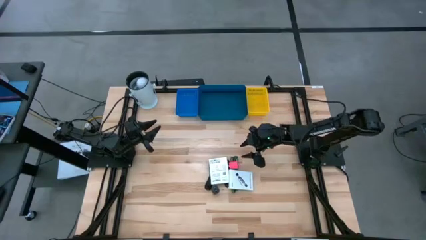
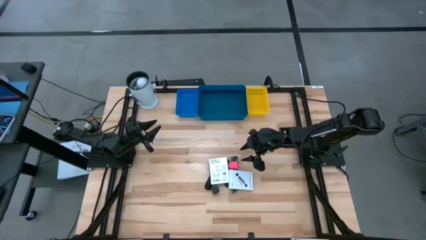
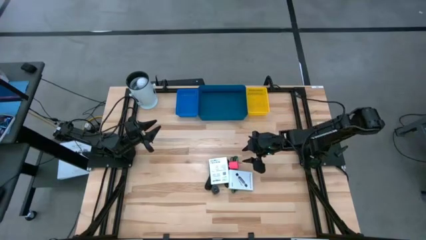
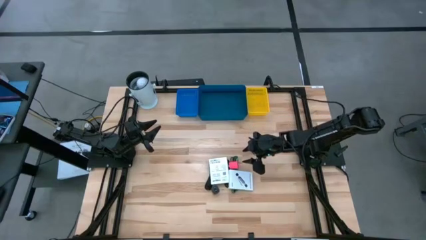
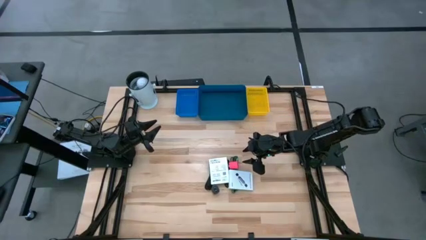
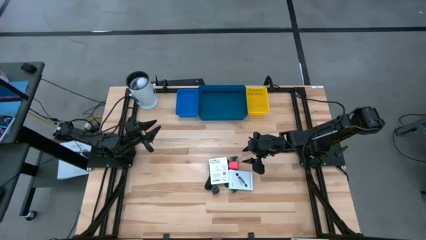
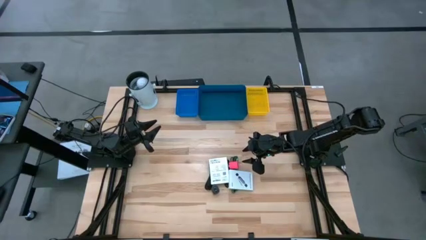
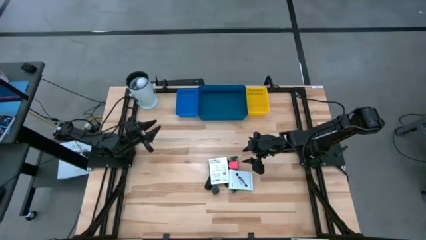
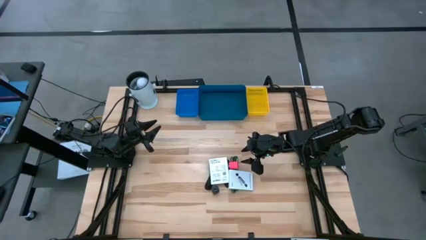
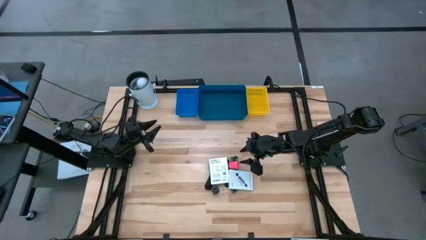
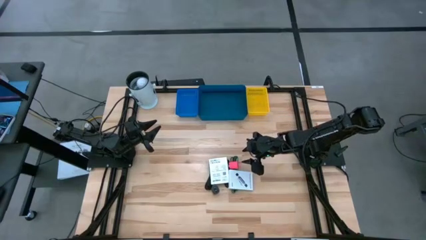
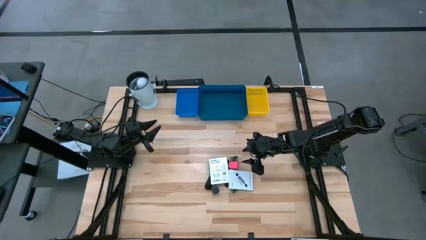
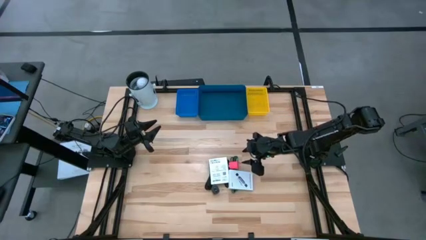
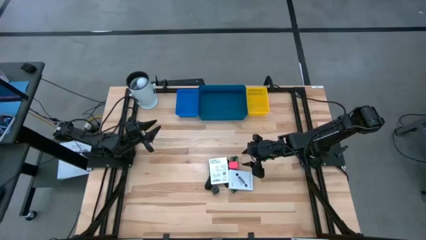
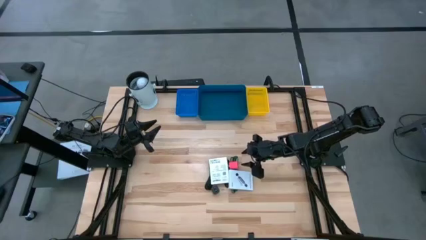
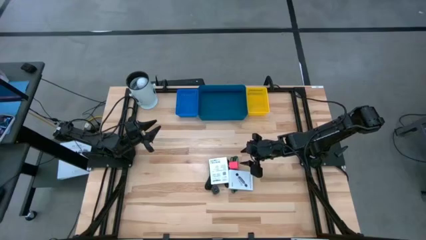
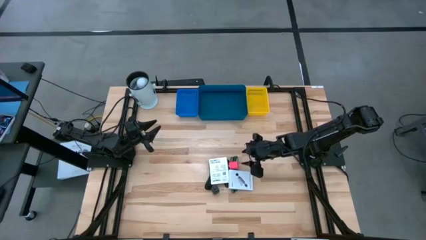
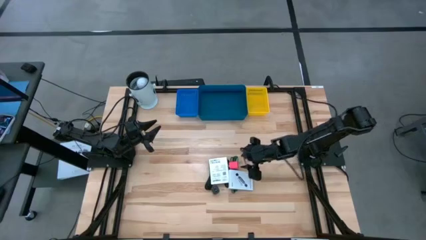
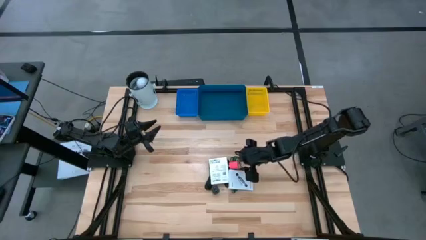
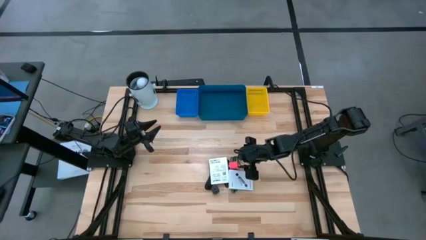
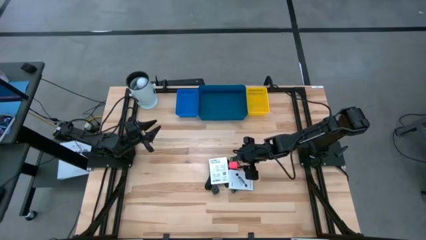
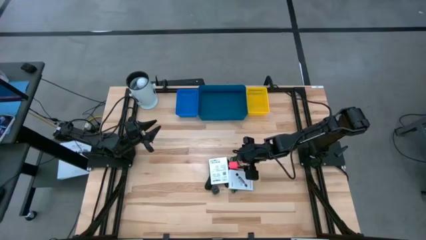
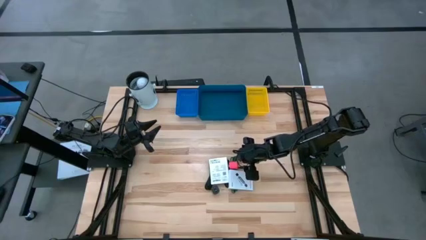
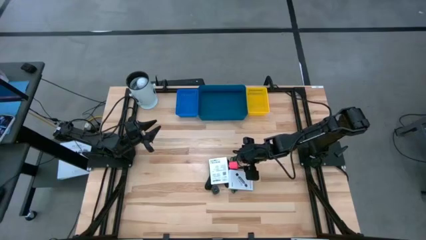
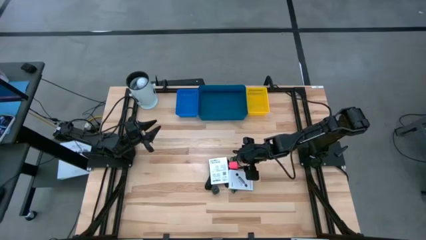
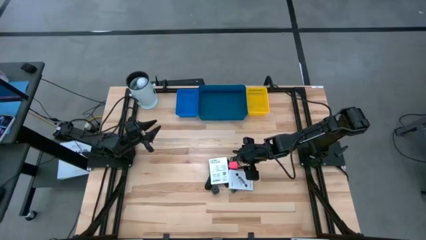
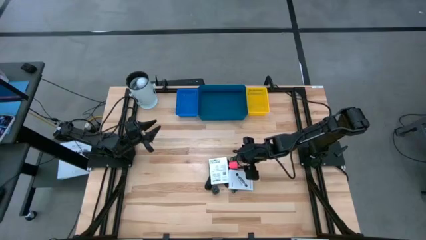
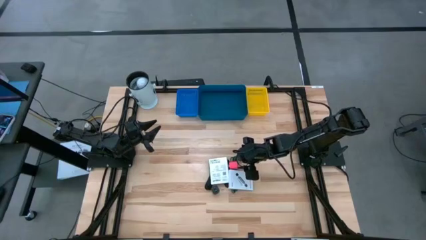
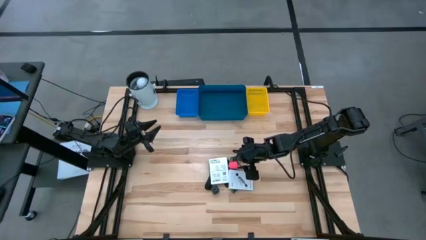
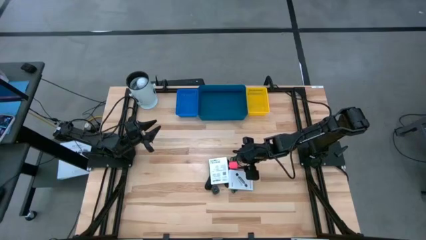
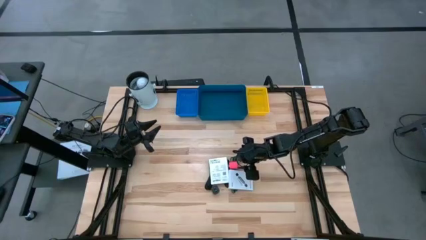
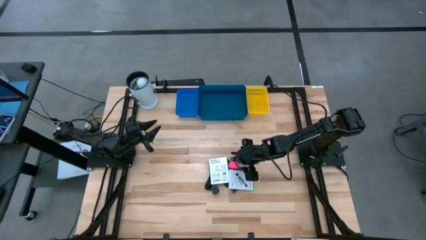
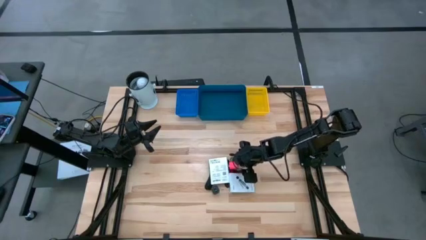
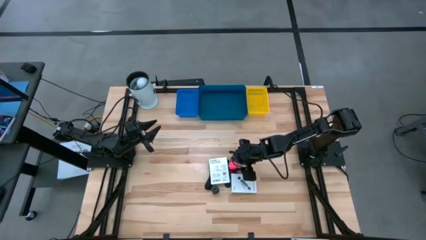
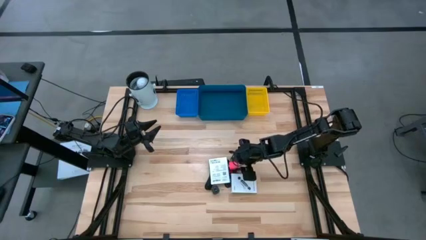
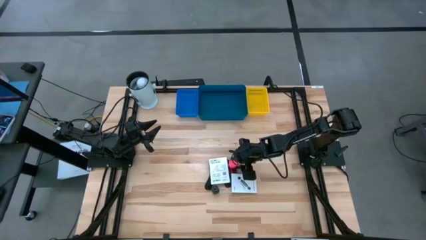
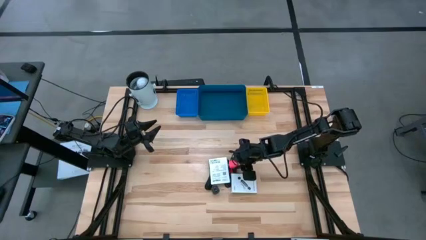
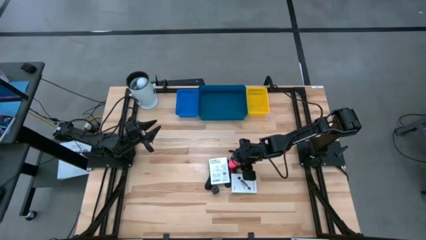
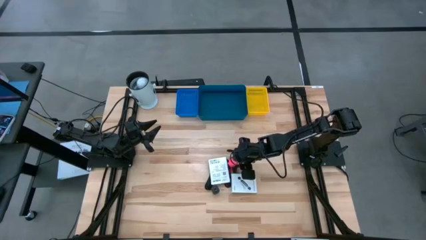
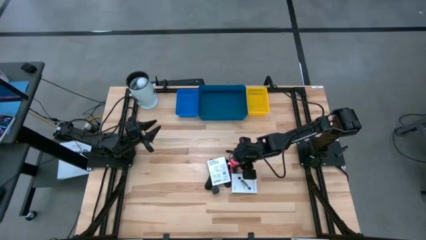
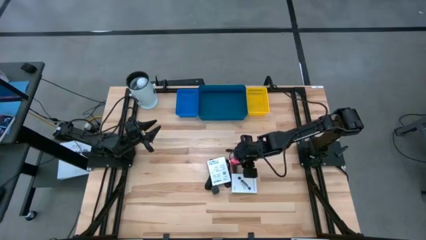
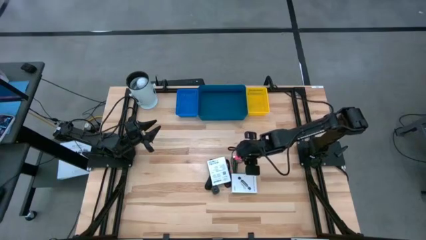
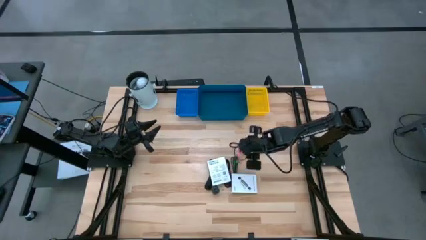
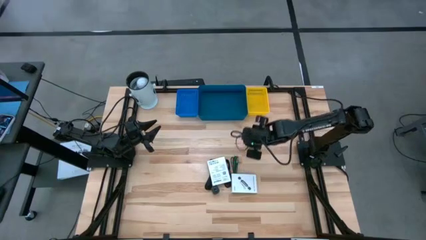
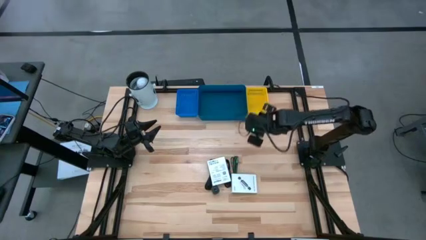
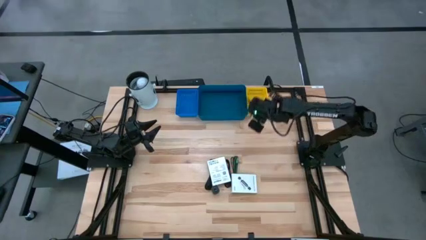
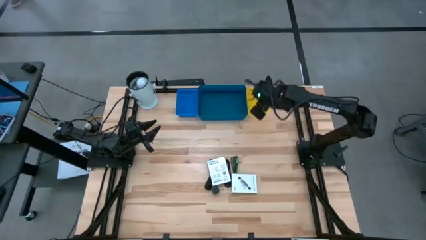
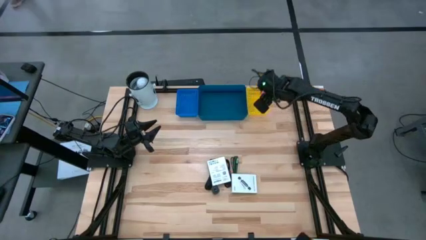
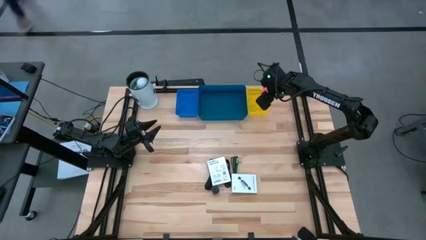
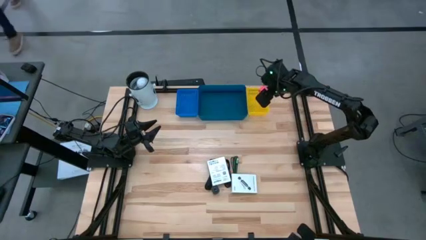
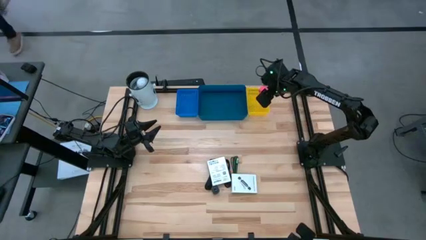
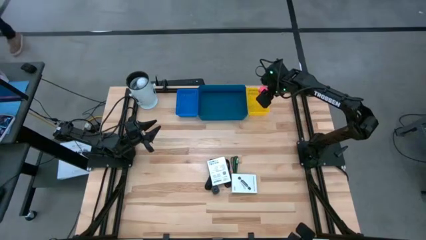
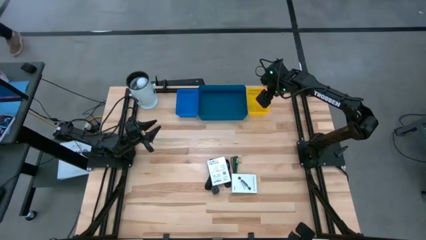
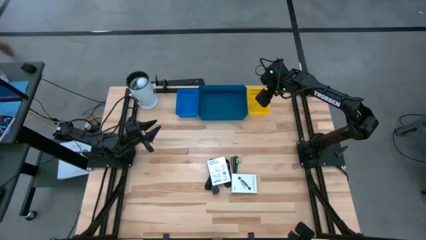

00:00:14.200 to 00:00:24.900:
Task: Pick and place items into bin
Put the pink charger adapter into the yellow basket

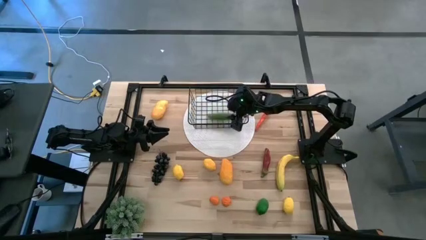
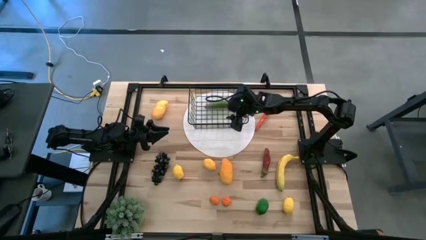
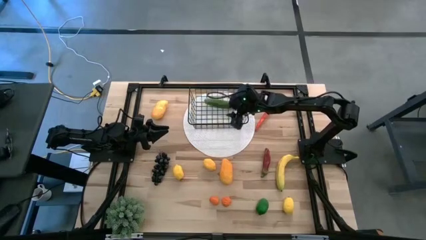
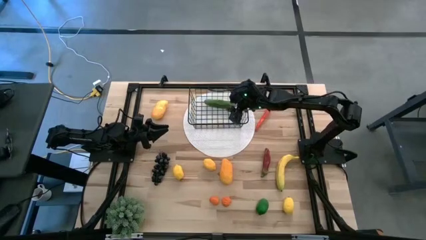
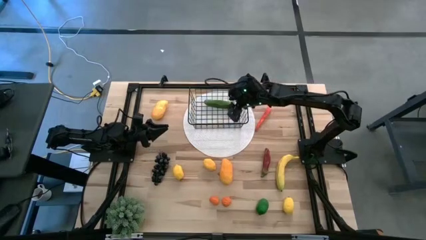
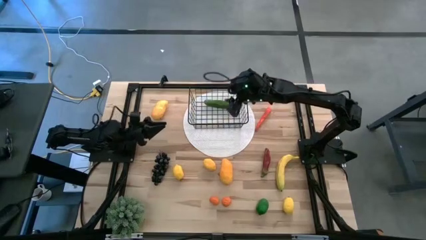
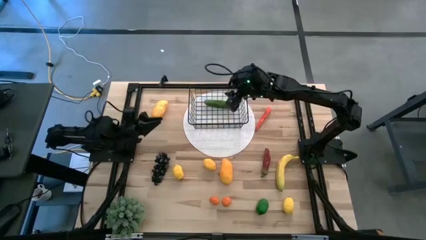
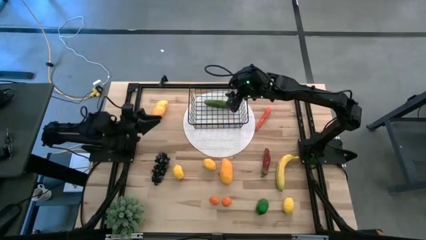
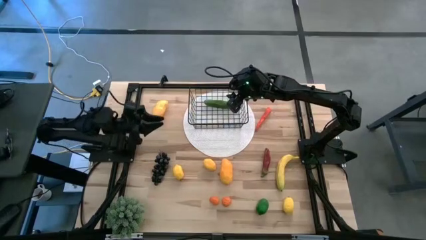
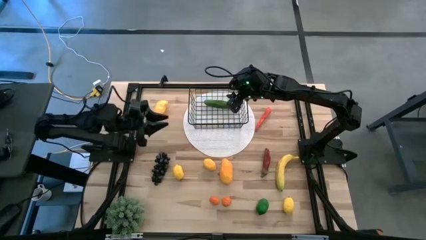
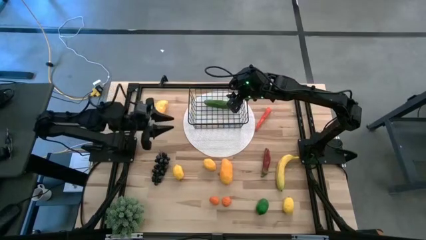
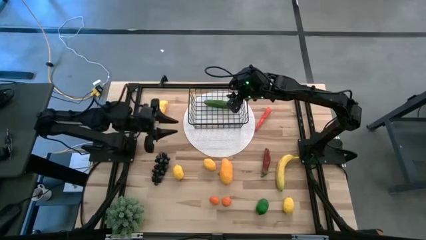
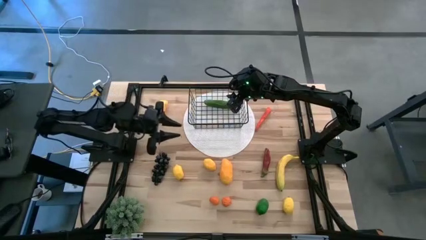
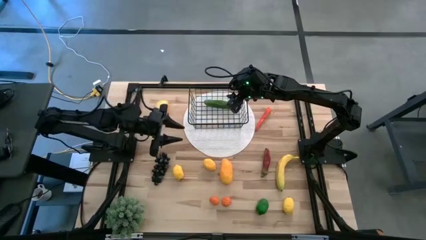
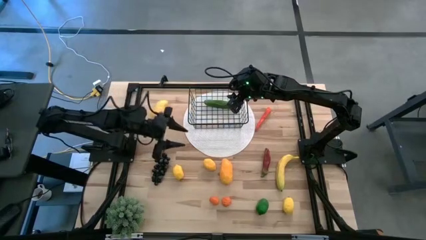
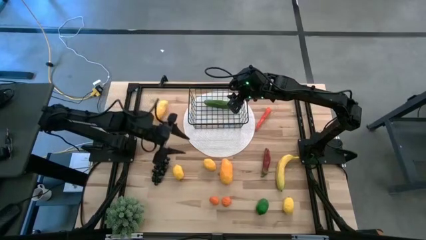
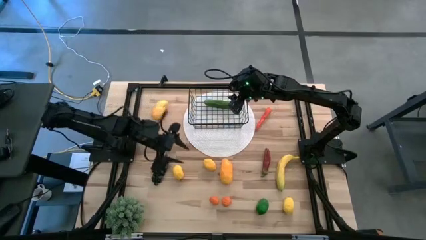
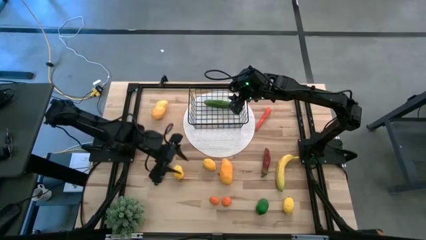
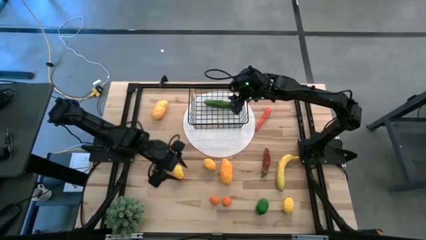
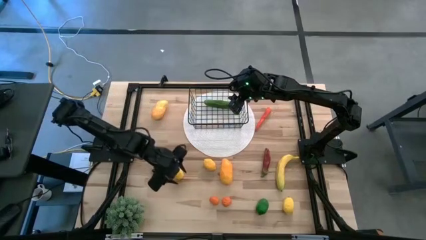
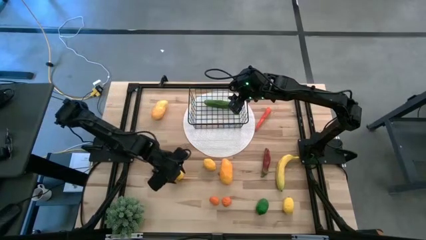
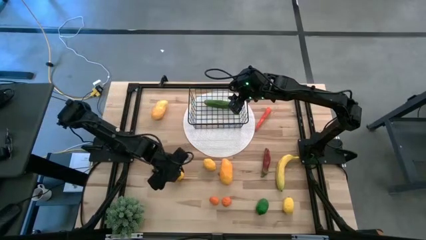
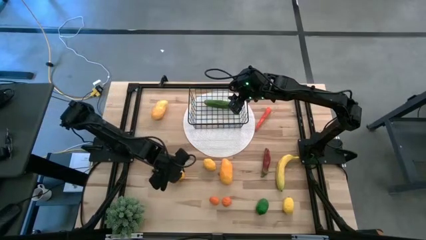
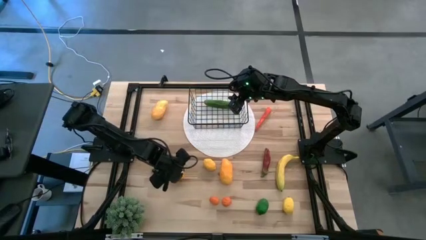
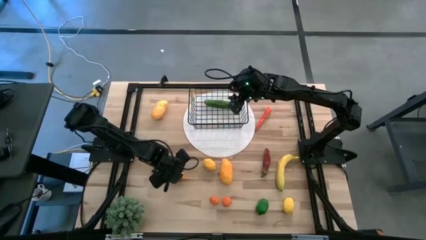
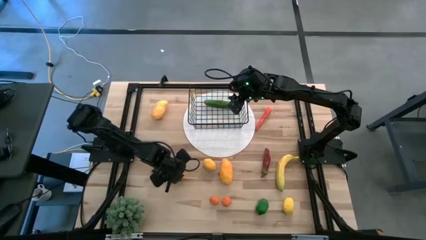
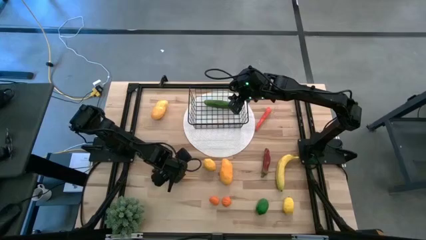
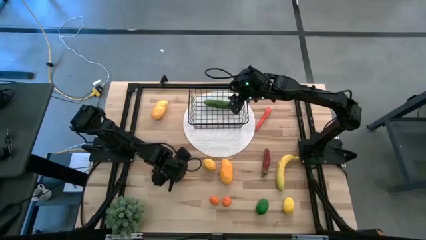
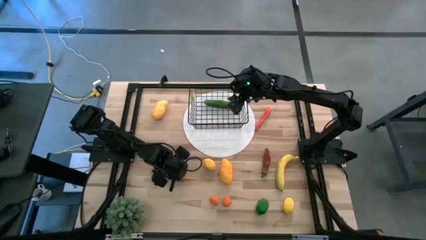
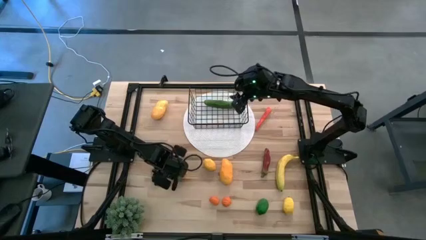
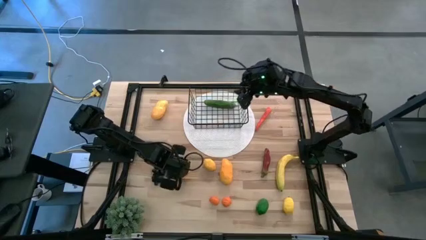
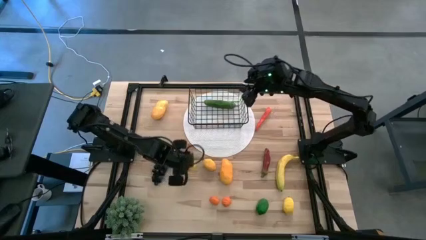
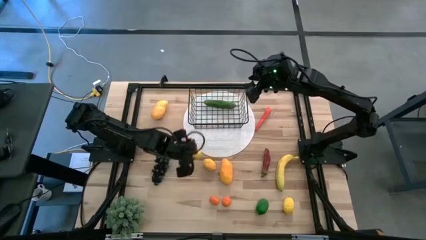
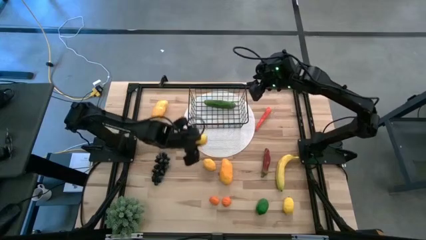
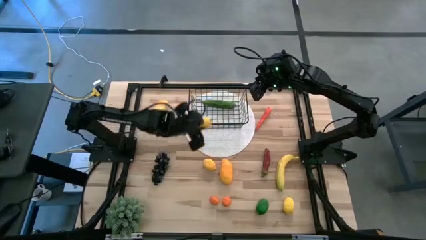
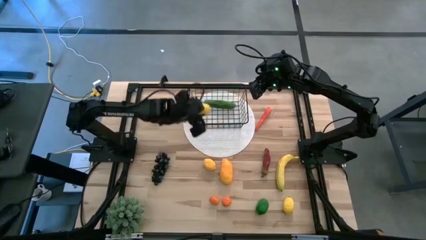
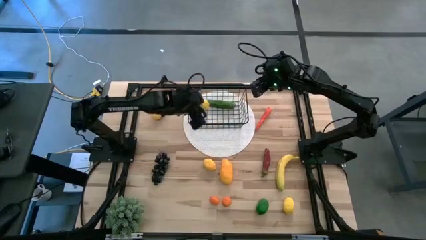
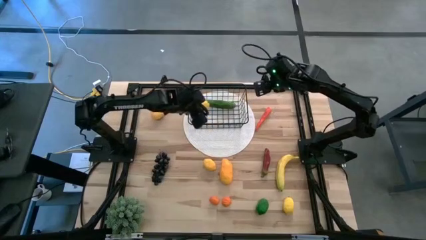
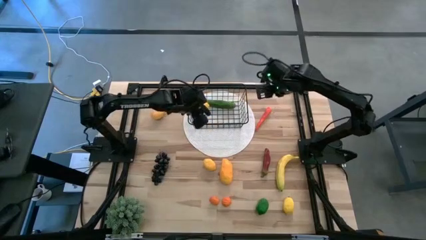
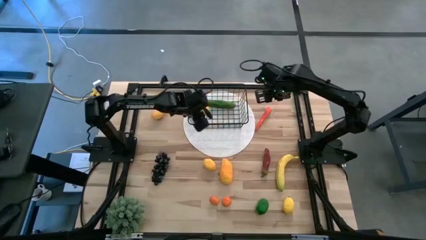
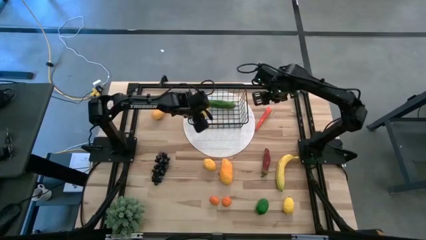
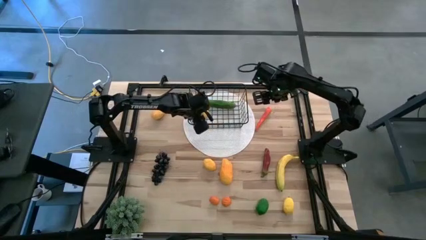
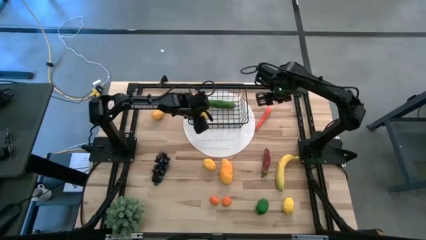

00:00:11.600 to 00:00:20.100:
Task: Build produce basket
Put the left yellow lemon into the black basket
